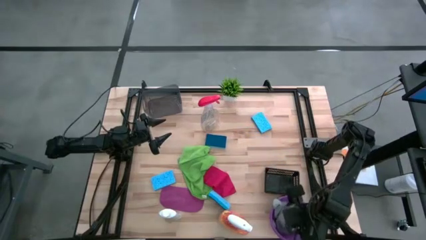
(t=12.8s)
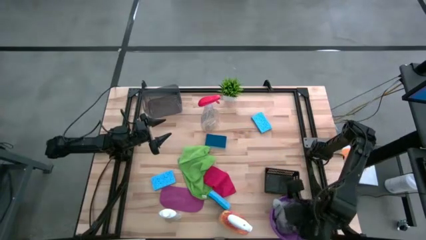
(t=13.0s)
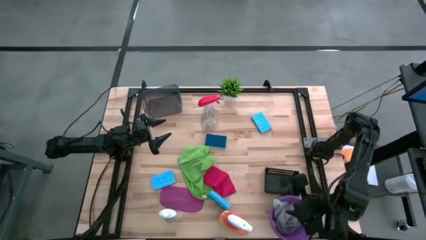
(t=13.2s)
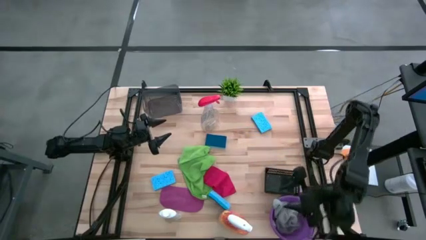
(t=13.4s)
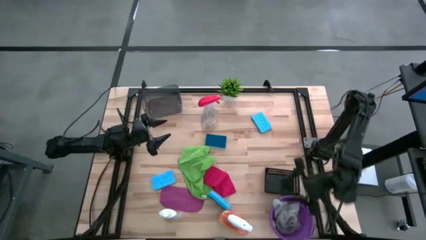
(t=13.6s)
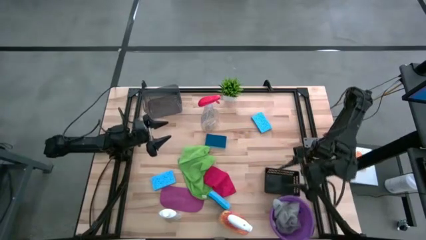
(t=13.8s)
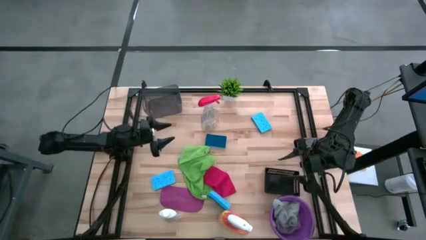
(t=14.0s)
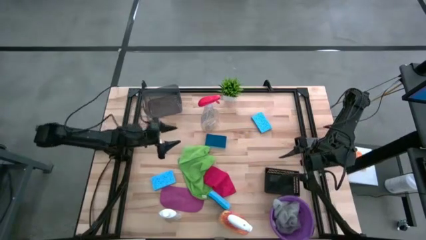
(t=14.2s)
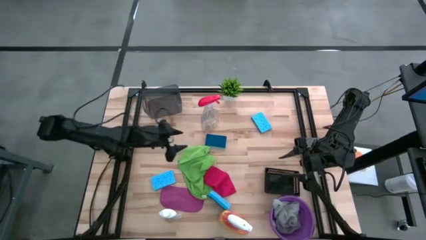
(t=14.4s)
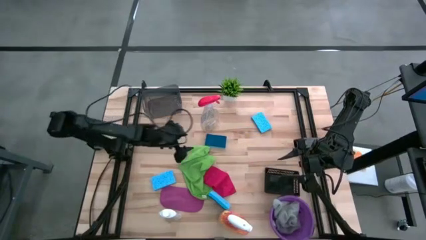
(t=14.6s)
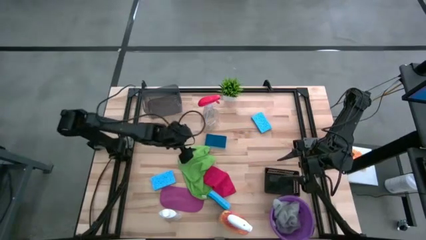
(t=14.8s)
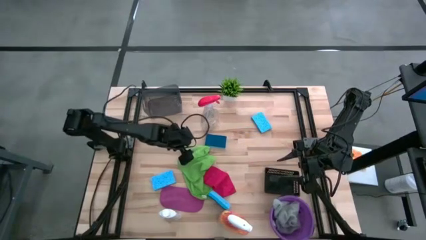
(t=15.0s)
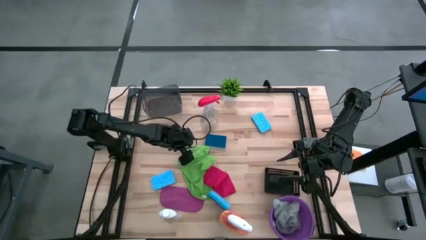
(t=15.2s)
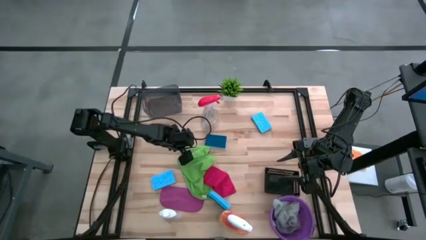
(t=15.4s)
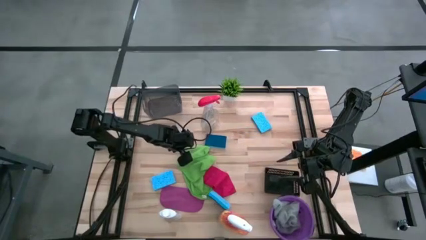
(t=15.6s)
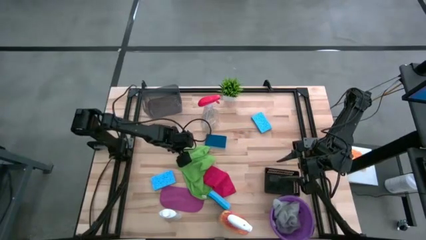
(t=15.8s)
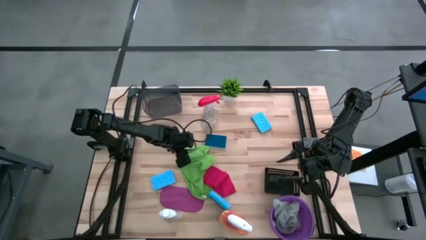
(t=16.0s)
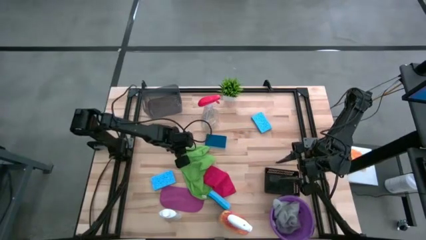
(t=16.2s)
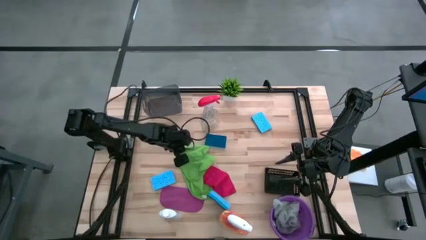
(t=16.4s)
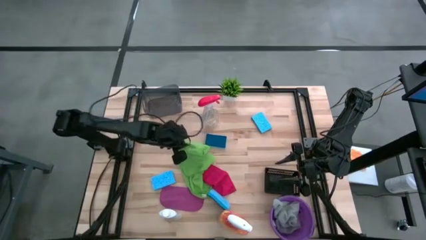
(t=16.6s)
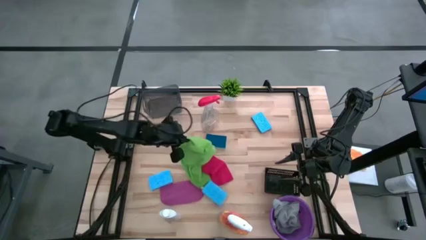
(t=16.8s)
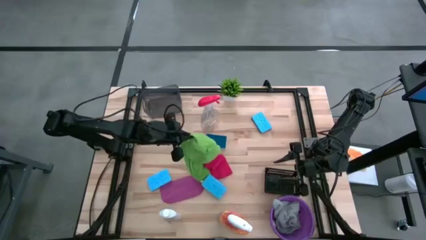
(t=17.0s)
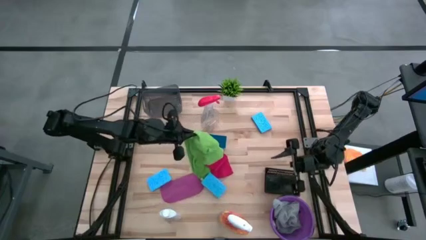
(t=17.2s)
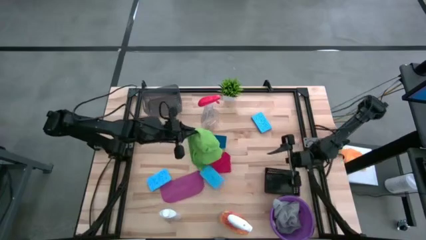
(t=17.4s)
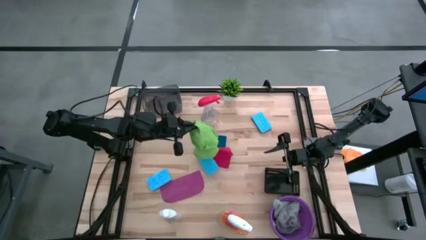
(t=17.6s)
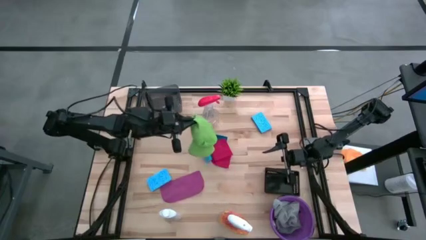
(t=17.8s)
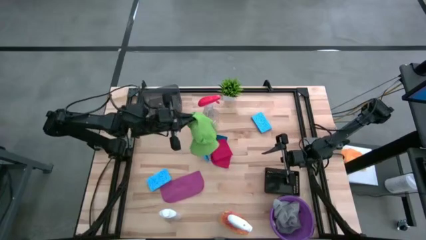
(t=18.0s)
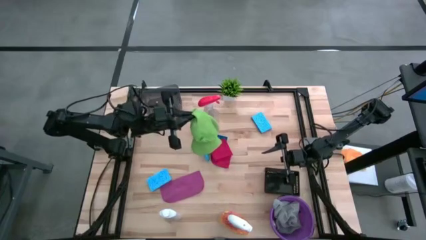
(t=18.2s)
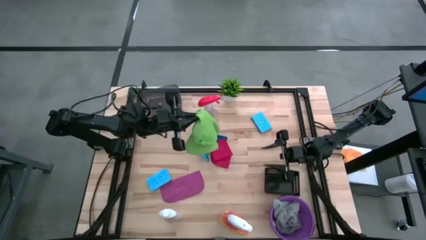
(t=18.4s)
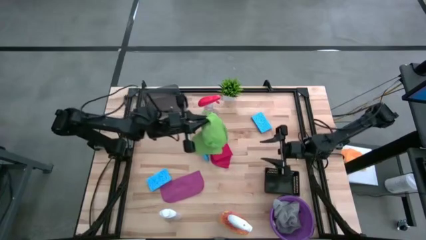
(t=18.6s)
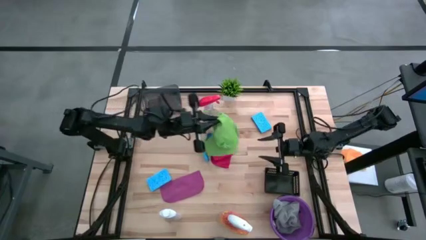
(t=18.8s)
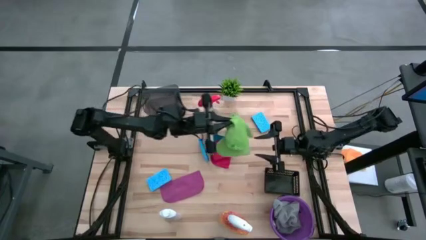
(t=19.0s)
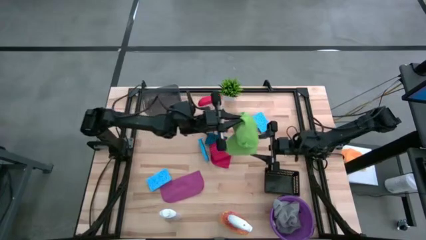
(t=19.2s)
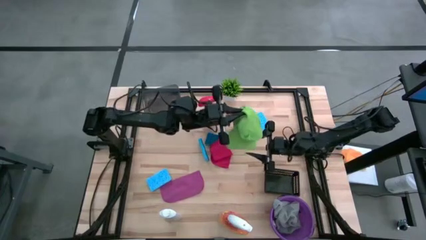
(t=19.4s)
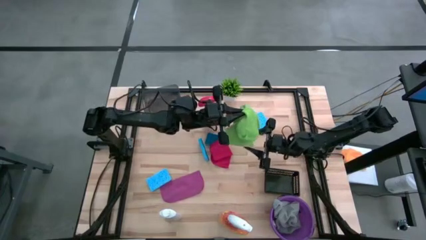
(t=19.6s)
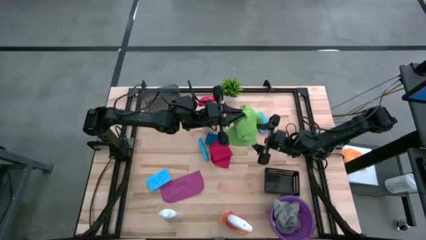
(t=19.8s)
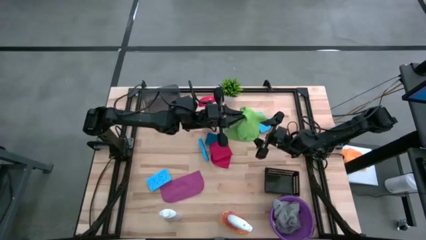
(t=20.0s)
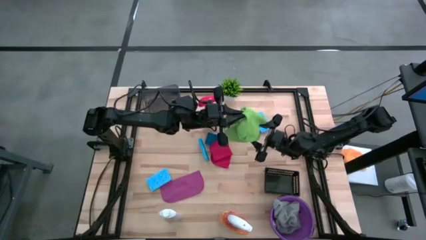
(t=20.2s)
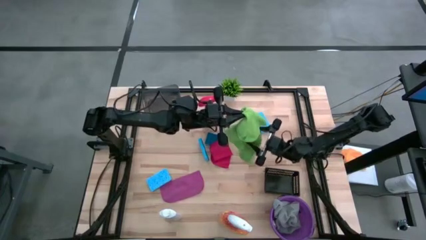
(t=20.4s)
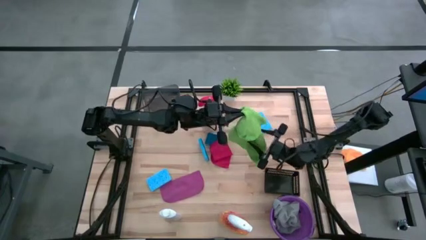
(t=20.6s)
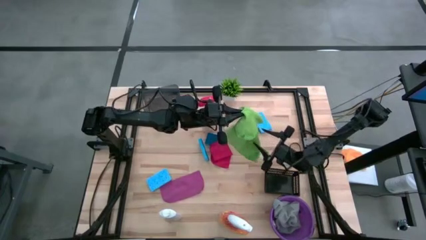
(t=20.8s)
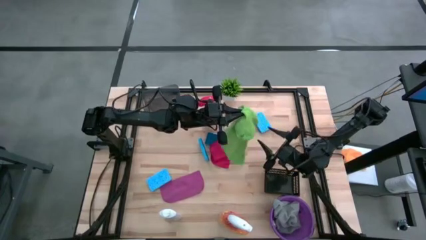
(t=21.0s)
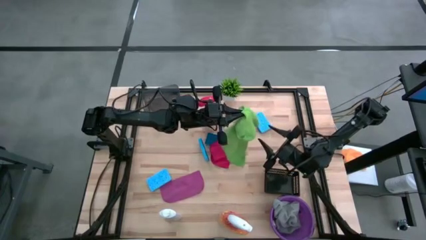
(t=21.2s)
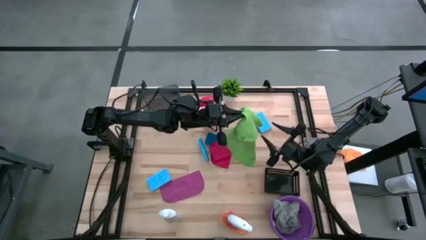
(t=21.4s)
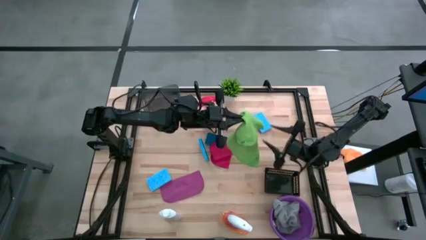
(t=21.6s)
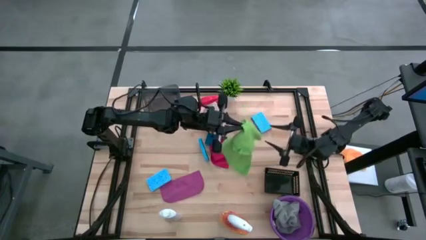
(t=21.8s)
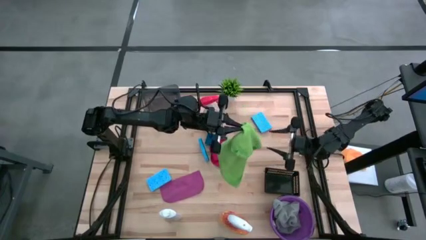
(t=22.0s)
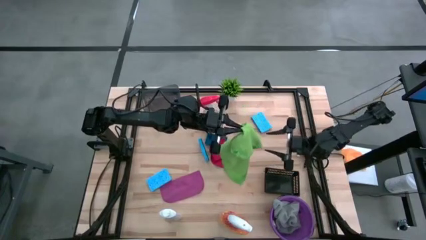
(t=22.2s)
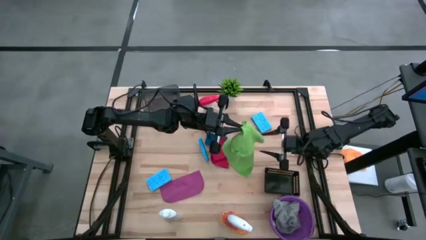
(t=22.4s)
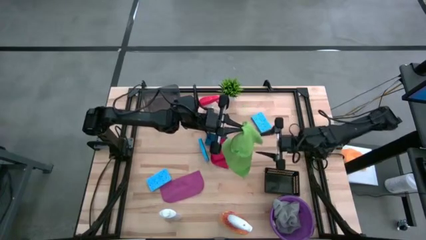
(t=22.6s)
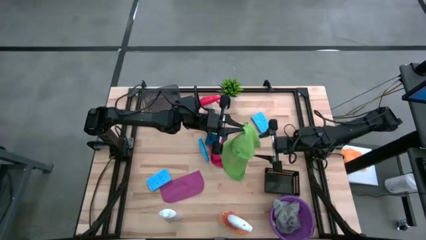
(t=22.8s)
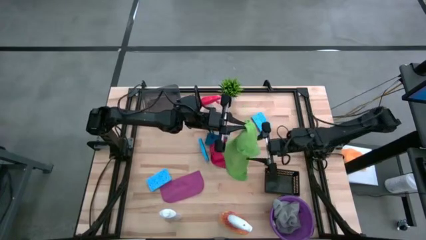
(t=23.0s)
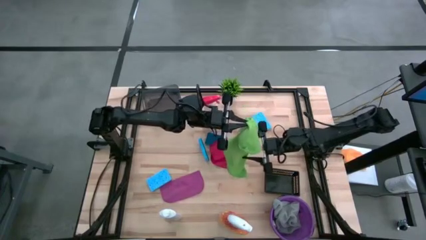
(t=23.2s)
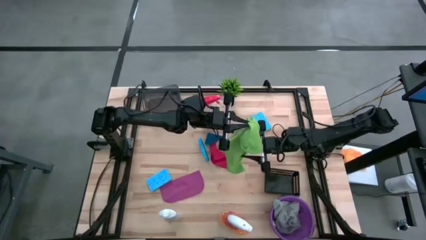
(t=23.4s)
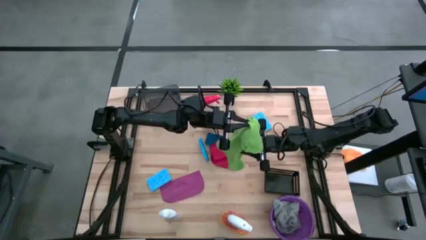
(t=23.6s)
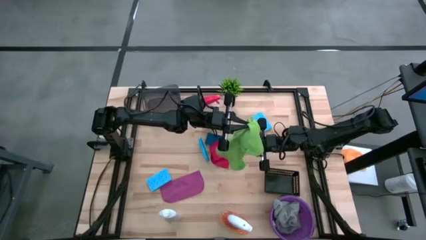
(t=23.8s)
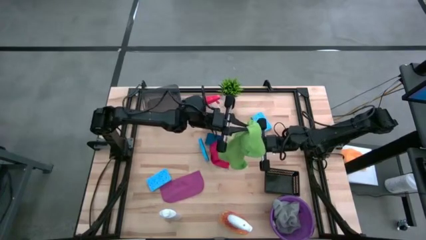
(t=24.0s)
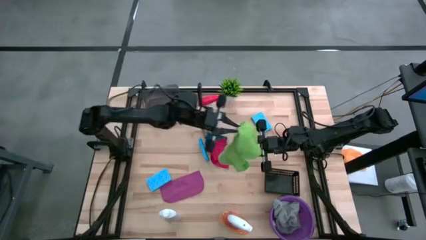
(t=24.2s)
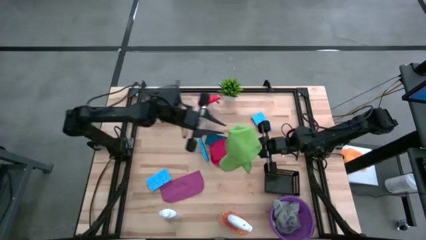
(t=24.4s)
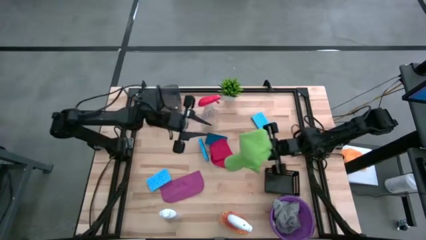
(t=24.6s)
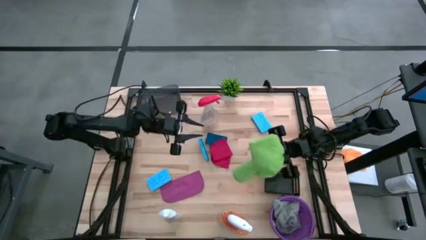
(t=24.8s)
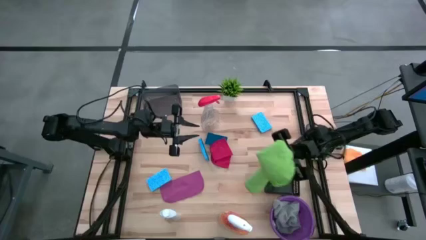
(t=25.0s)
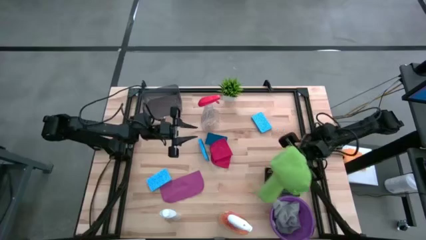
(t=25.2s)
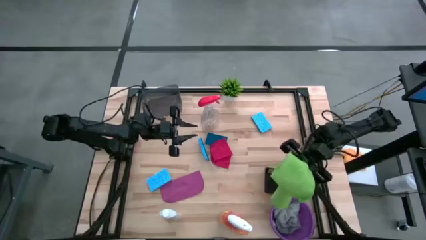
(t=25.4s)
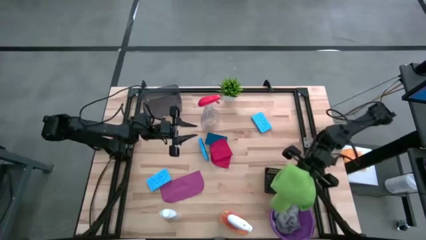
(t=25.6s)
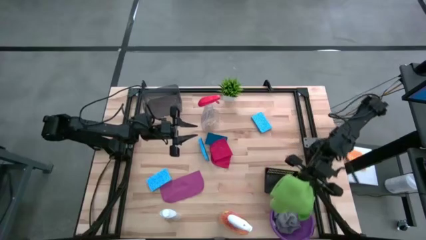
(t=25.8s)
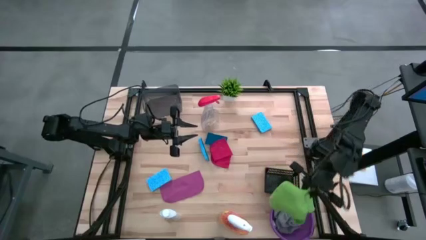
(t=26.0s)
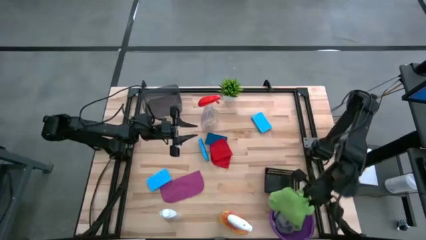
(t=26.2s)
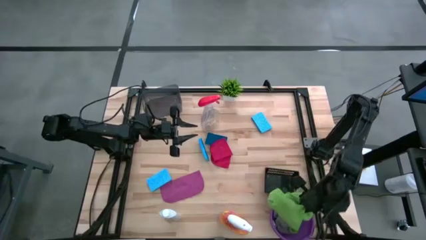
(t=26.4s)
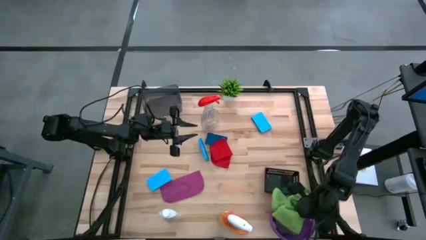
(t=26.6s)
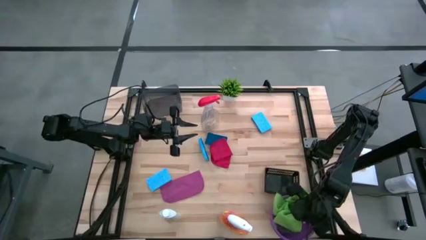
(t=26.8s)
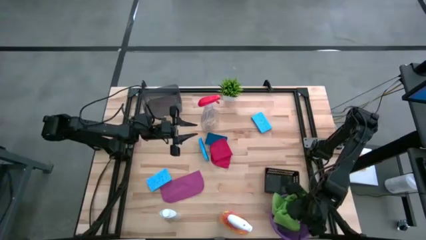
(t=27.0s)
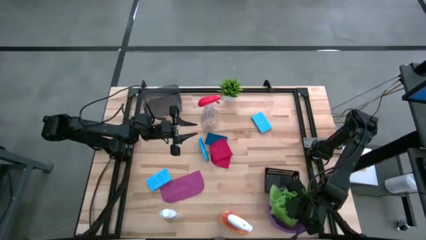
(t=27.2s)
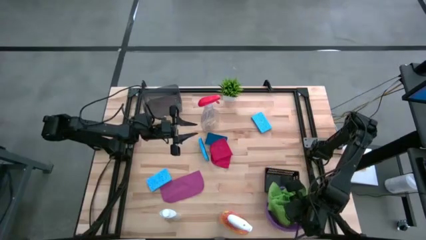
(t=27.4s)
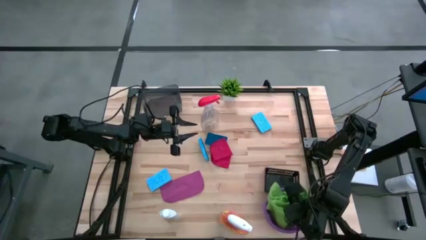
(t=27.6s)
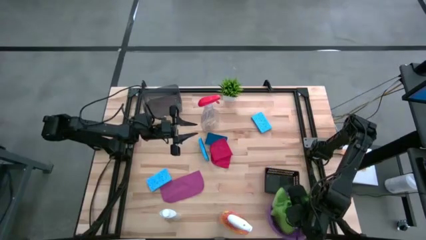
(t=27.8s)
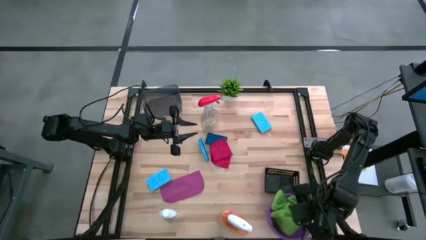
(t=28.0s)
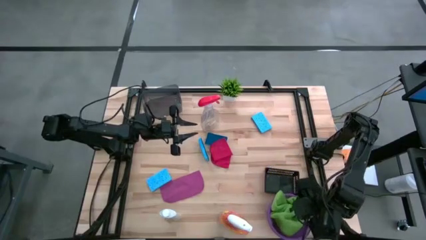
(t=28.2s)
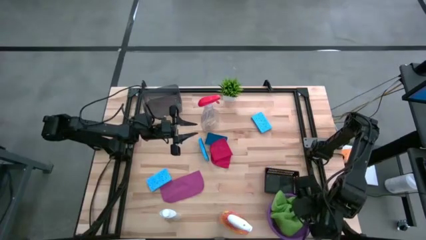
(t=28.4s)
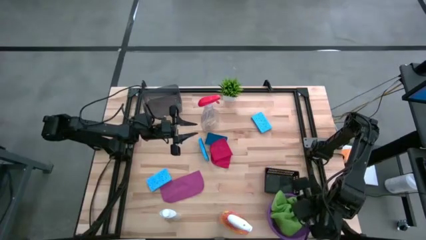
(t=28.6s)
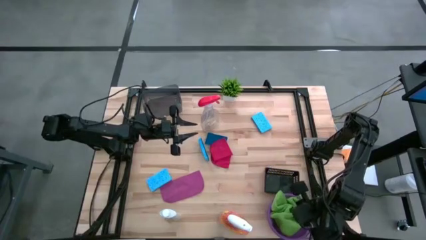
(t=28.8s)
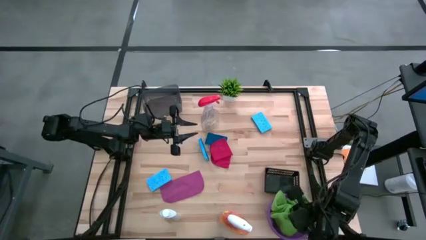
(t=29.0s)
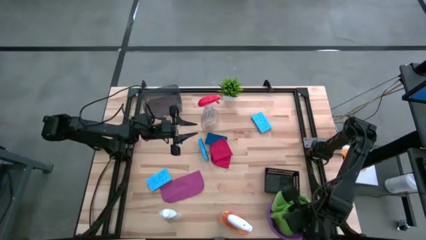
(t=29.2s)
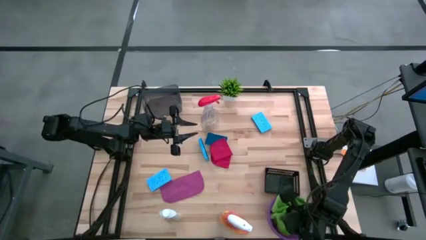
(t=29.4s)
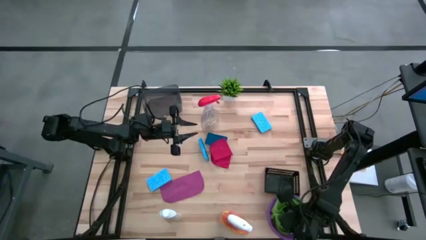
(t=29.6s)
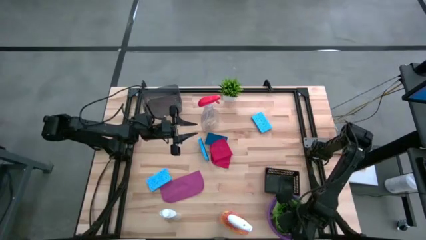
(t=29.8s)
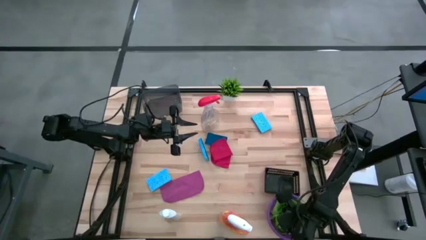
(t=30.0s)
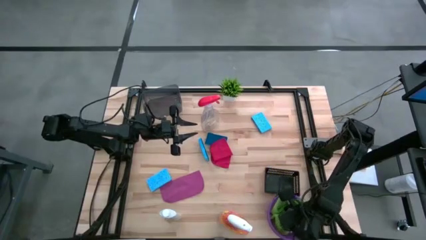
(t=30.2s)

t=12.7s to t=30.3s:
Task: Pick & Place Kitchen Items
Put the green towel into the purple bucket
